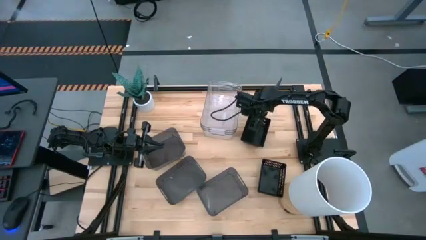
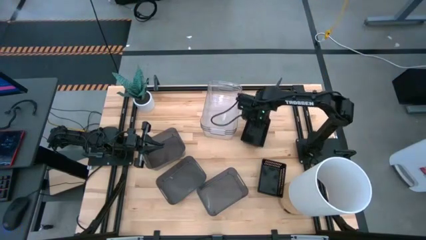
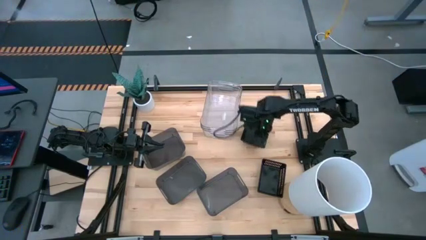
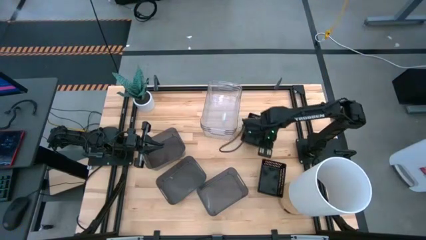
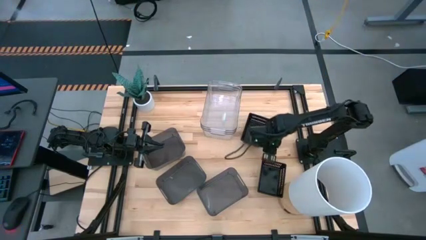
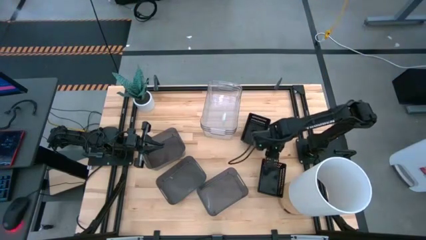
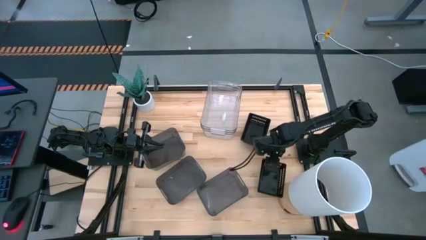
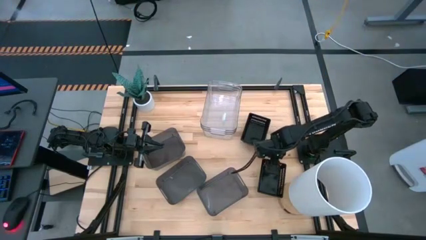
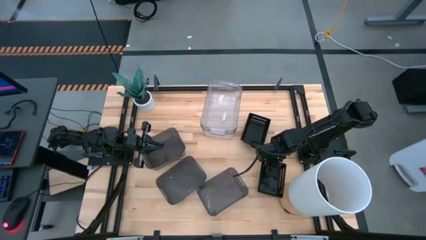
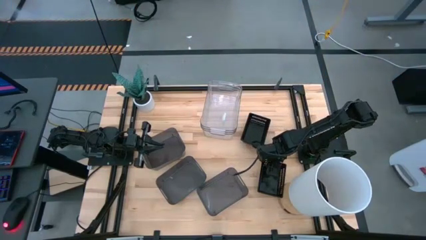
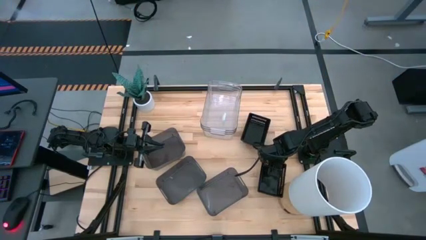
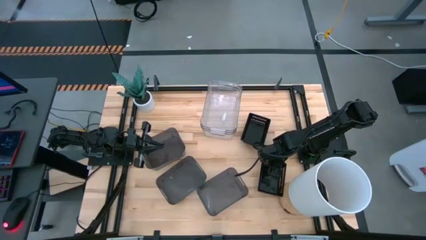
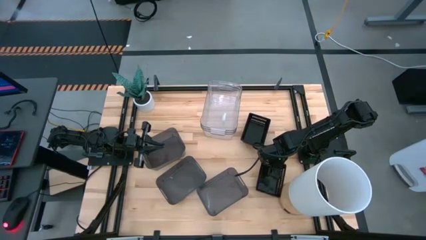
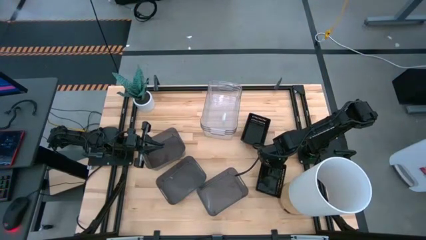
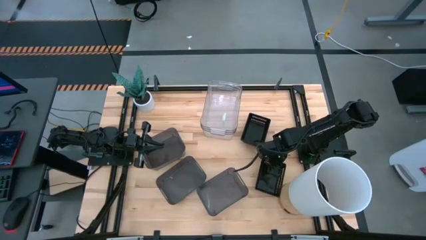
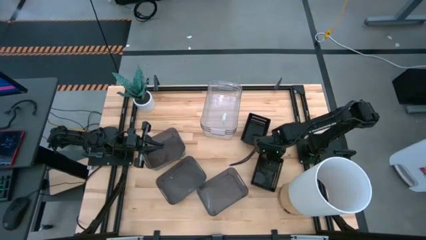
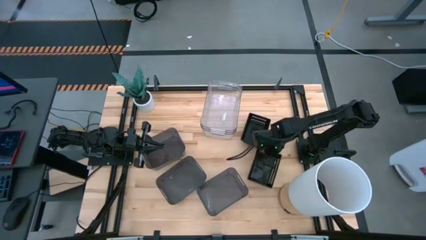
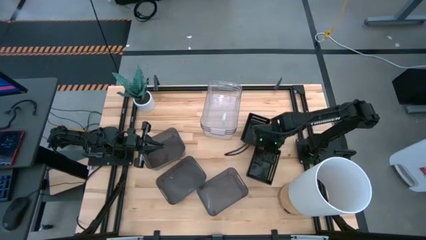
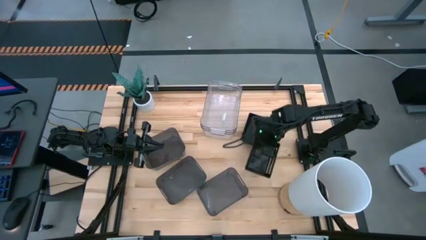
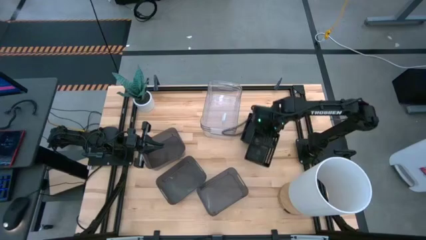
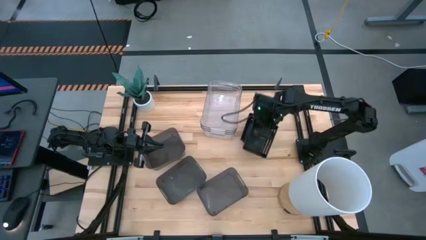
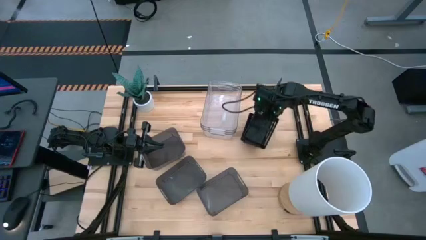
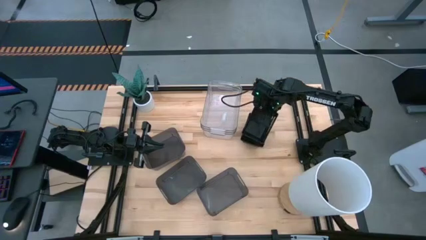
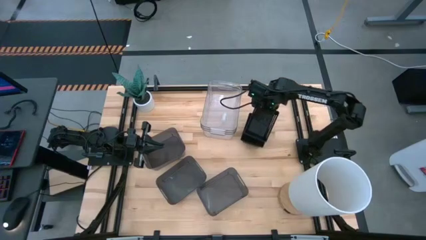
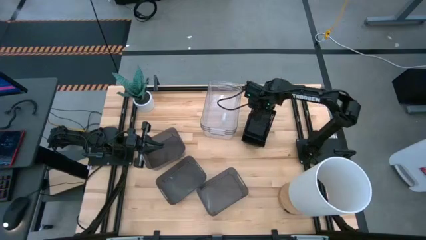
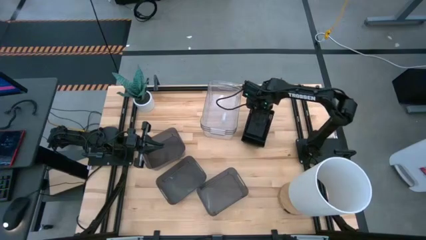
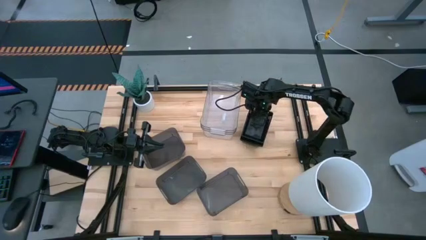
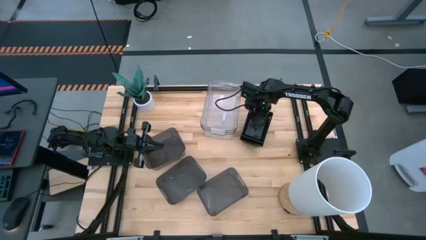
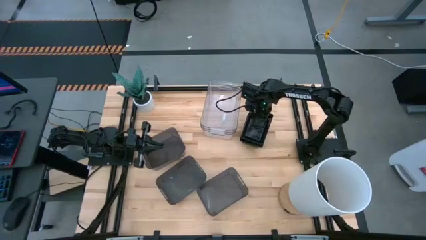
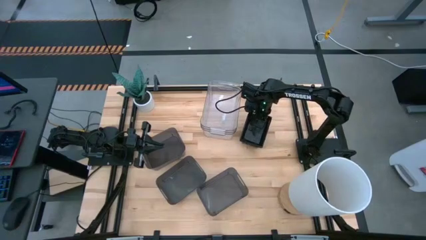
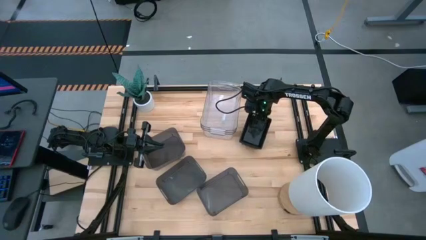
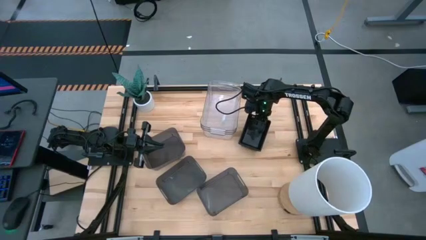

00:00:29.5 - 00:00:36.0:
Stack the bottom black bin on the top of the top black bin

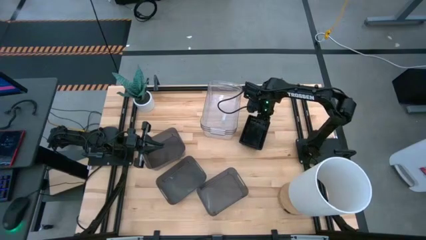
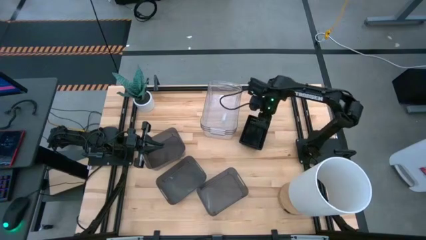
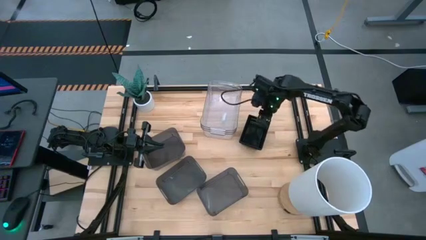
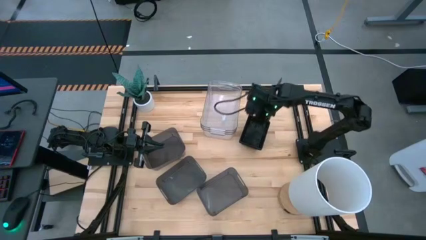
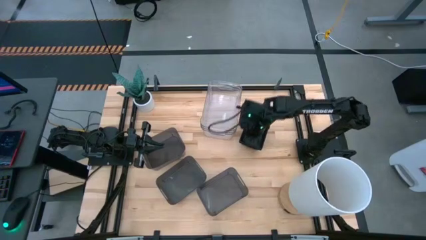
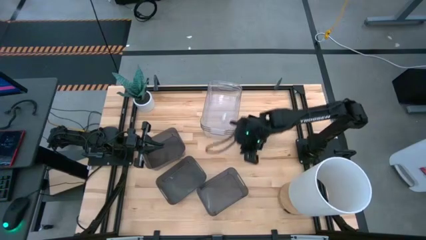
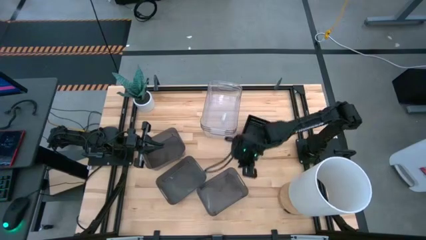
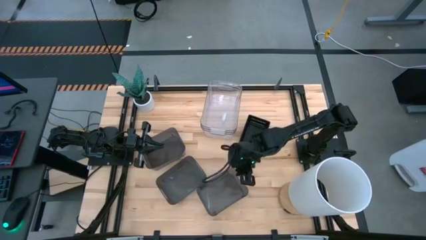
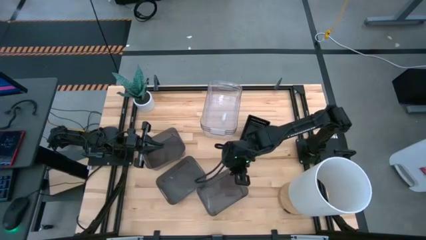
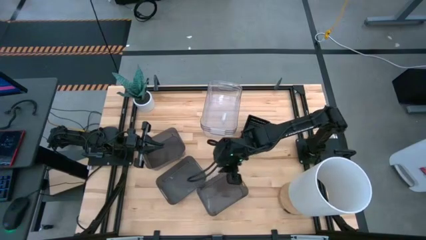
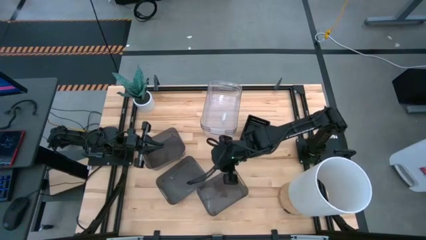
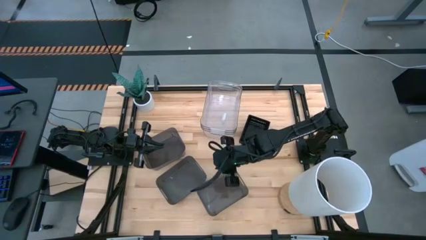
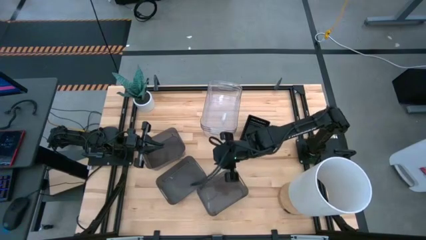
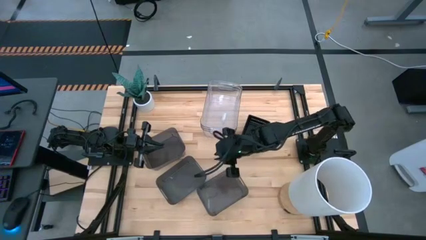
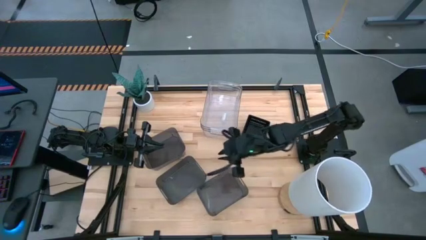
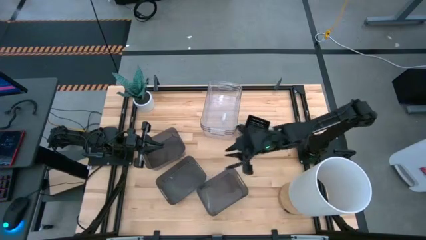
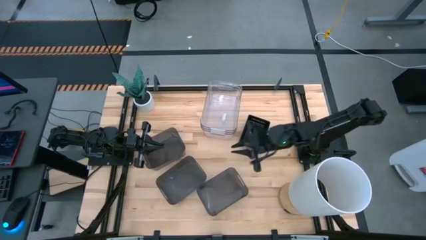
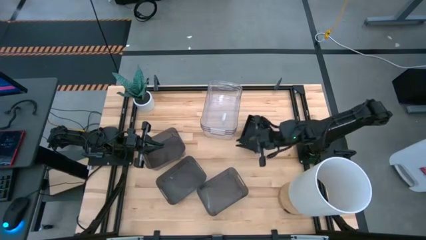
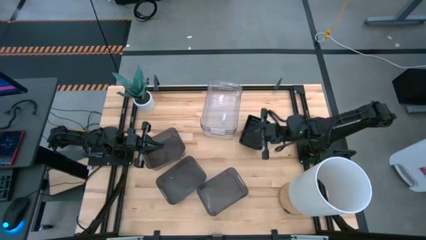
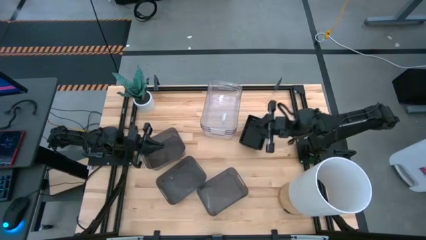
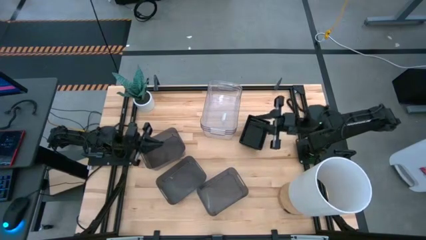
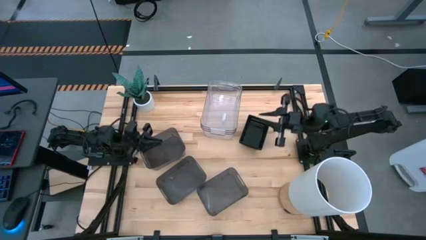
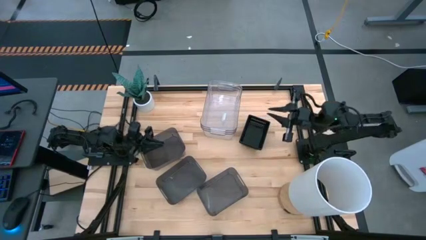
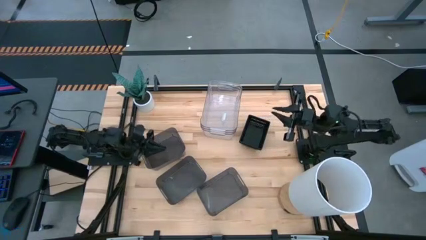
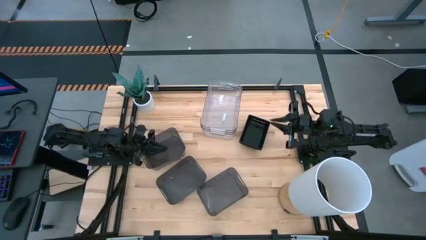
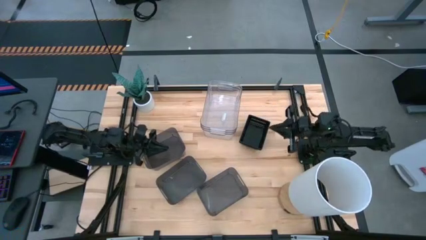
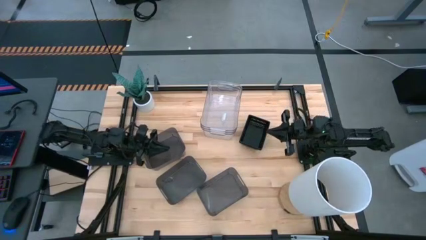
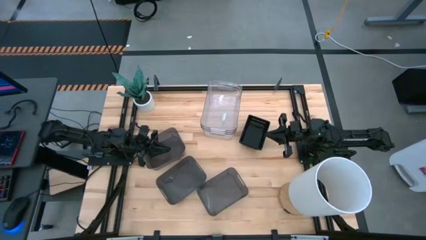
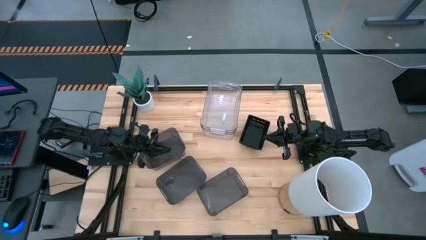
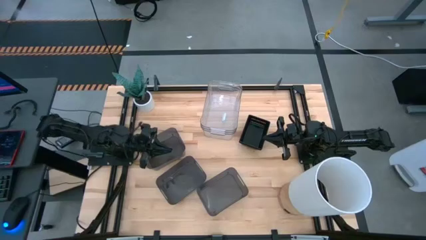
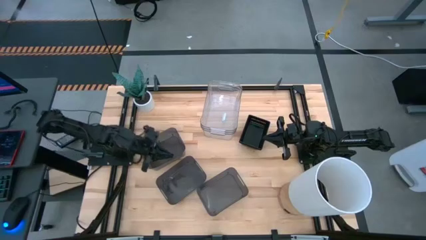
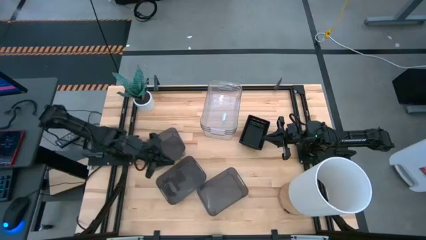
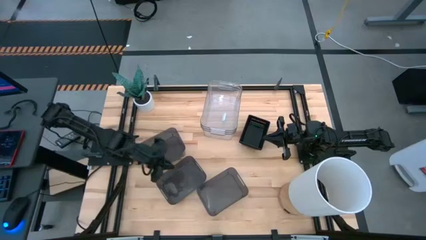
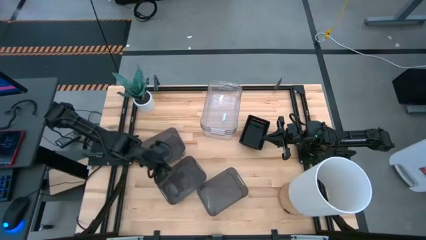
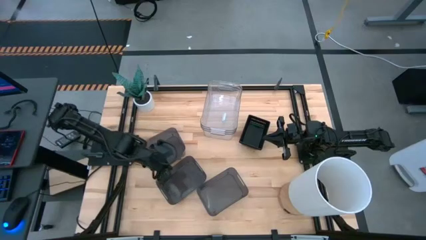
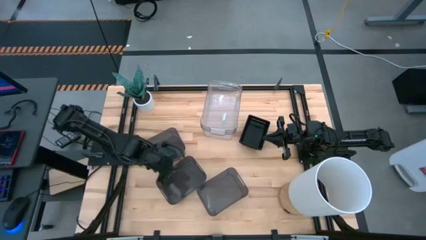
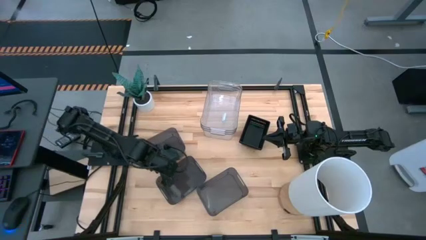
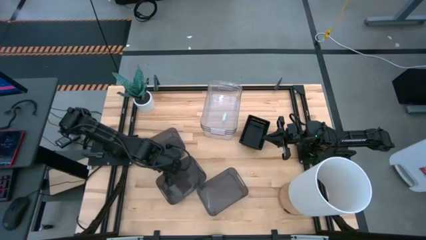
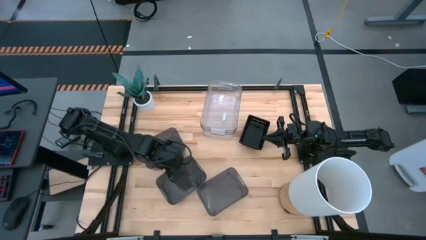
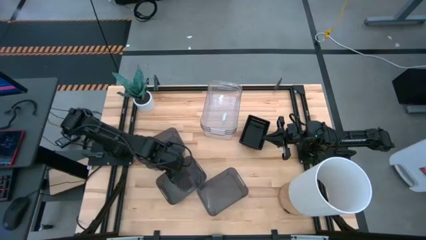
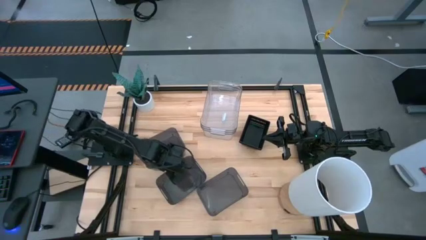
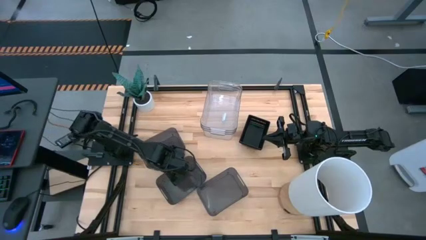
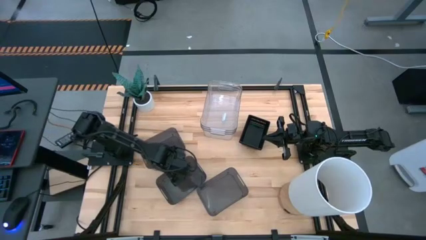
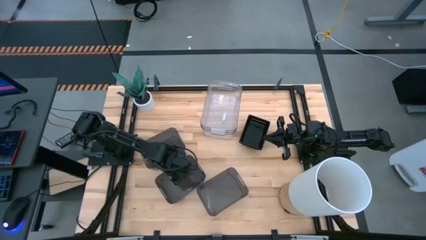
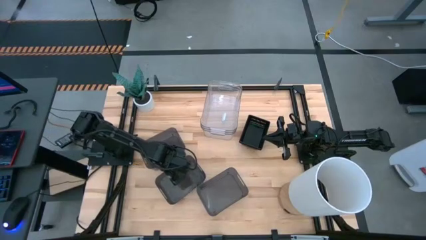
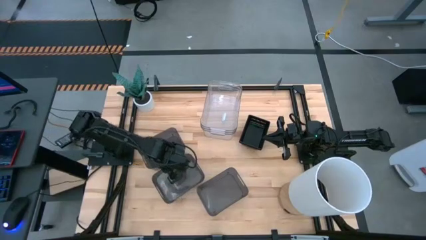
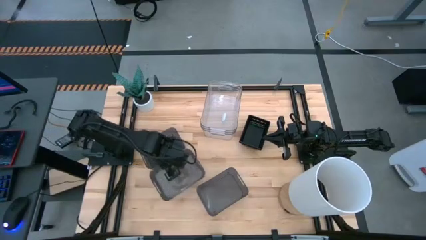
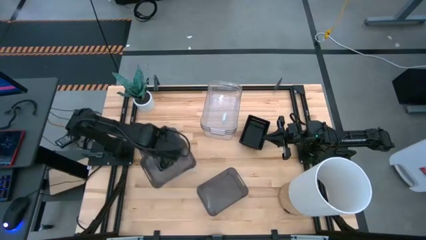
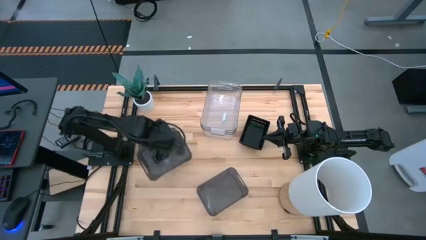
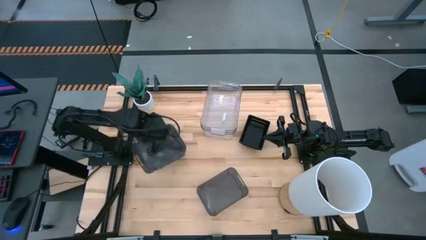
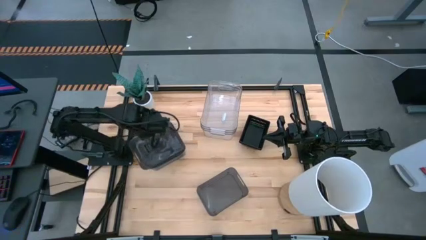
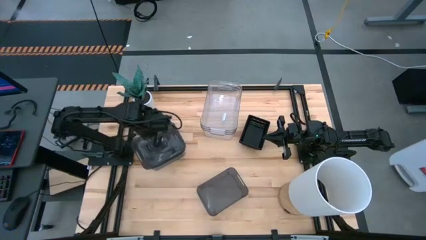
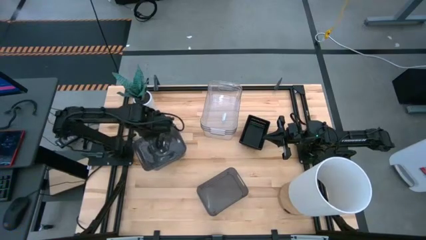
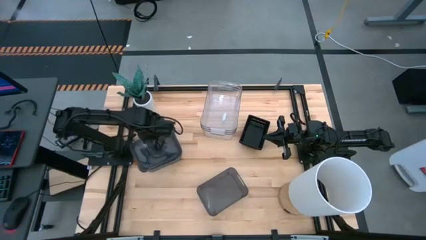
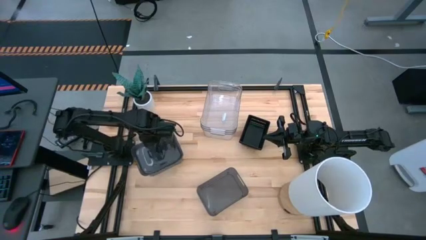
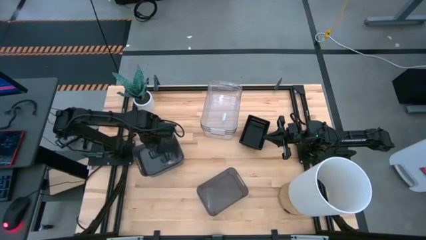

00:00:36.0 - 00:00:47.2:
Stack the middle transparent black bin on the top of the top transparent black bin
